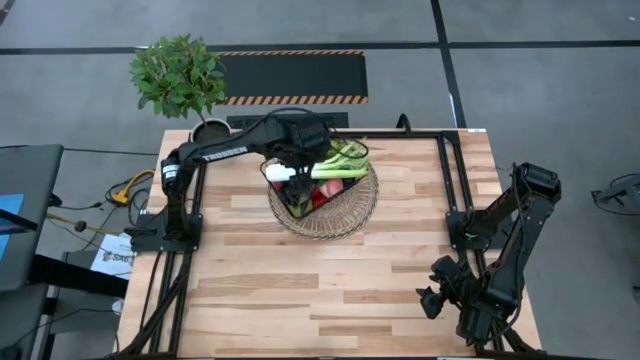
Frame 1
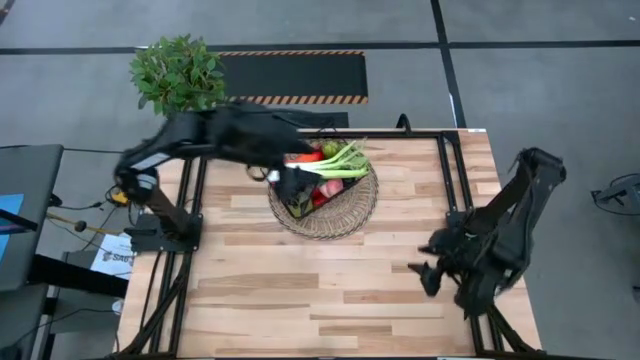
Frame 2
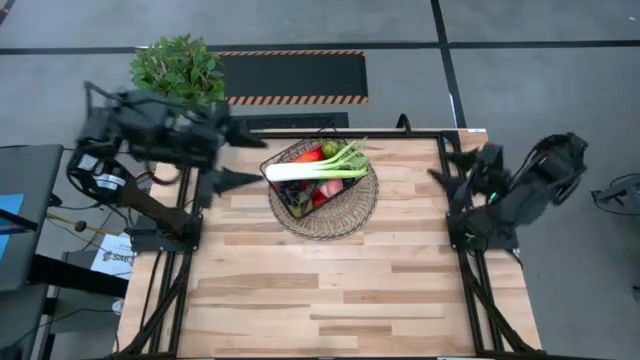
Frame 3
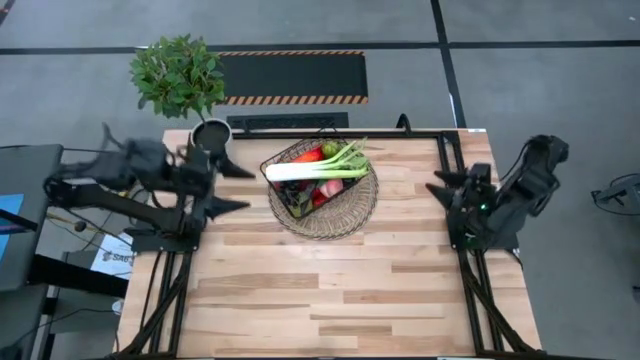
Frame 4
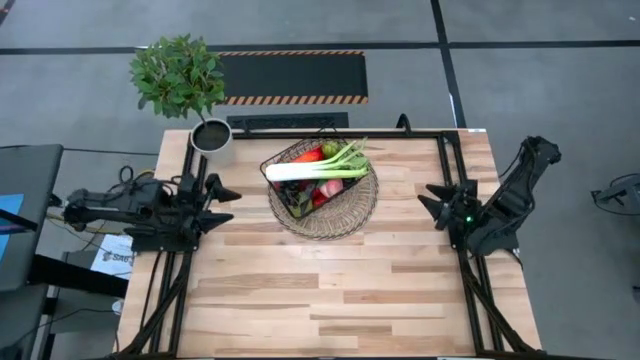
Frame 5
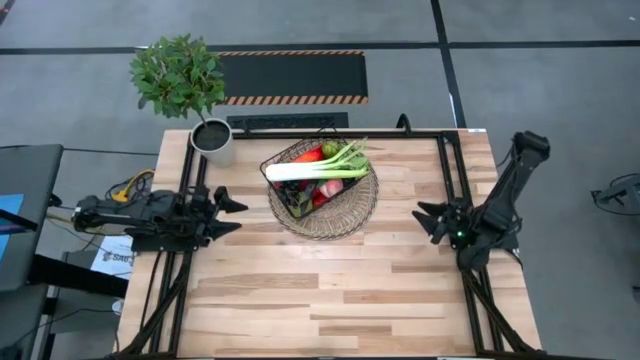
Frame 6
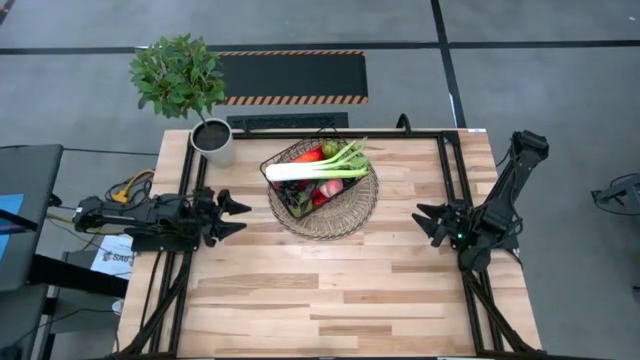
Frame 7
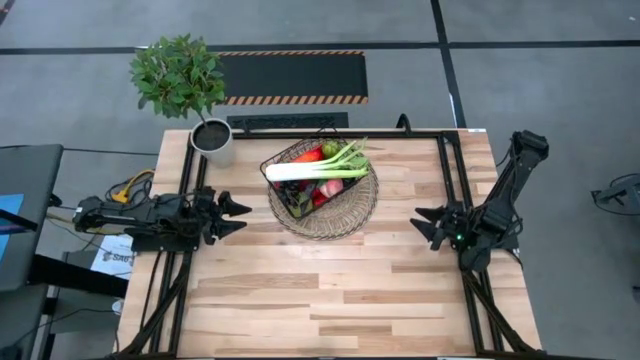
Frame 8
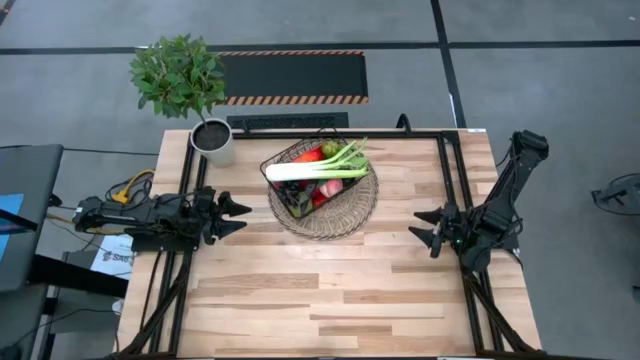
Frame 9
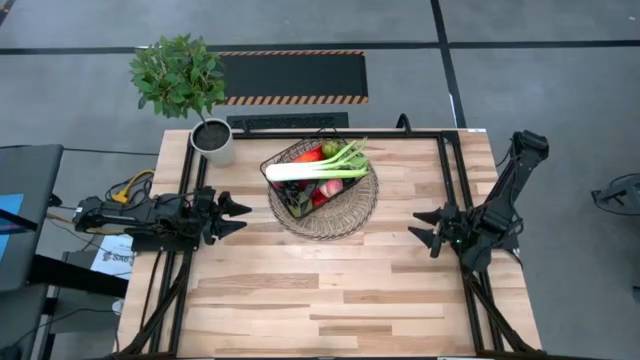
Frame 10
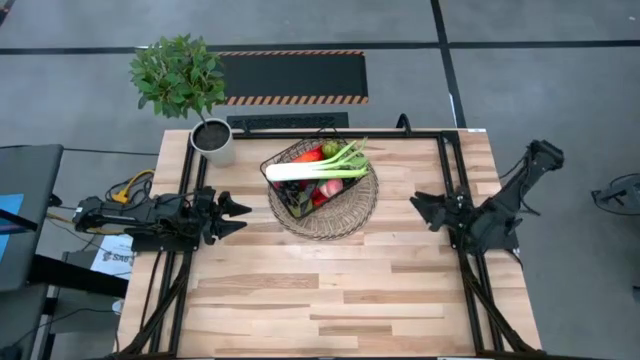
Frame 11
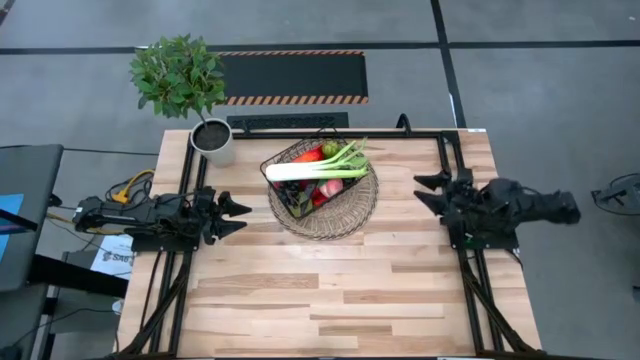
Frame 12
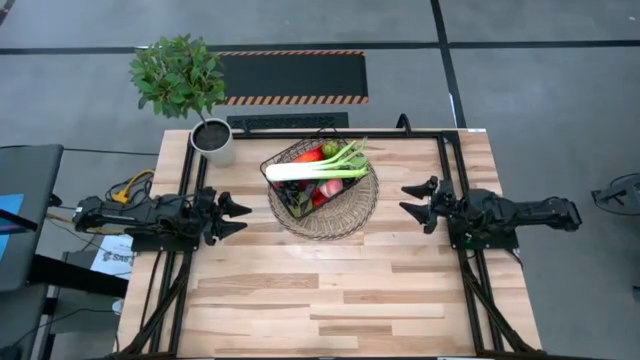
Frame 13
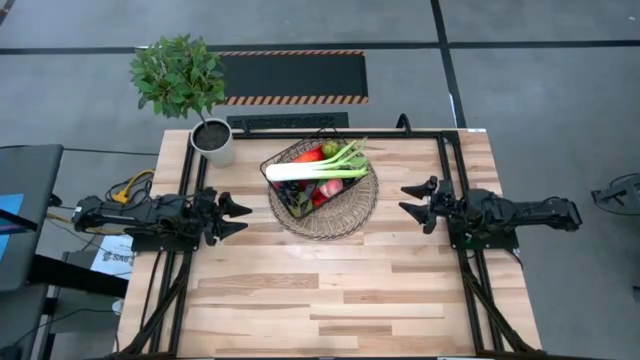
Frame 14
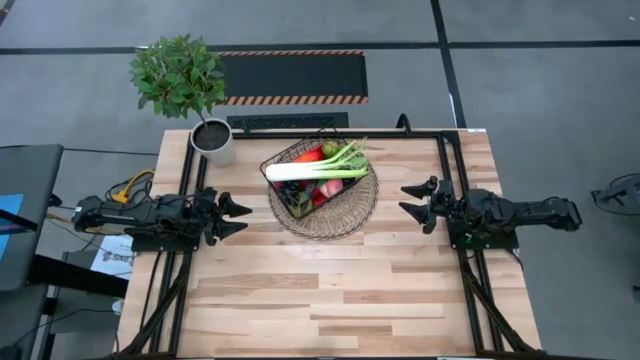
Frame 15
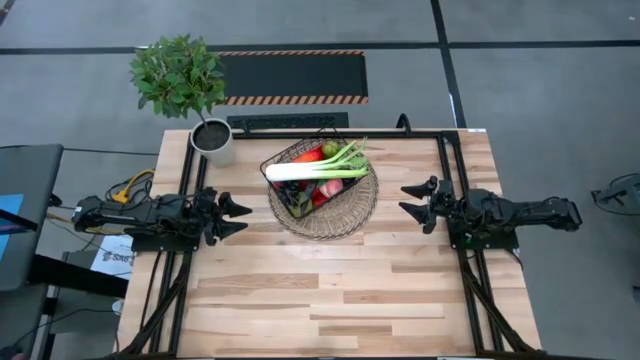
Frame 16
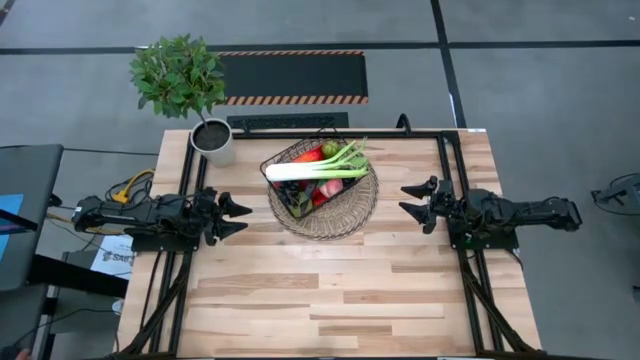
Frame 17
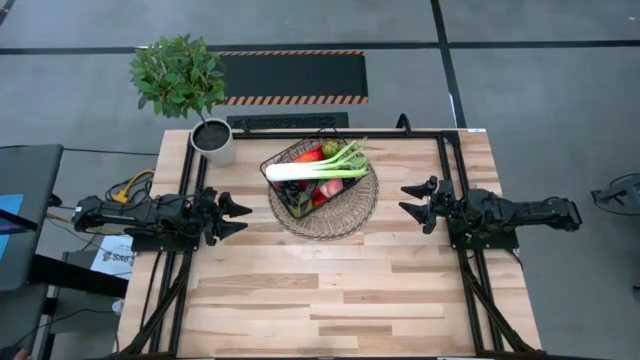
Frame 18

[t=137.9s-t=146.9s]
Task: Build produce basket
Return to Home Position

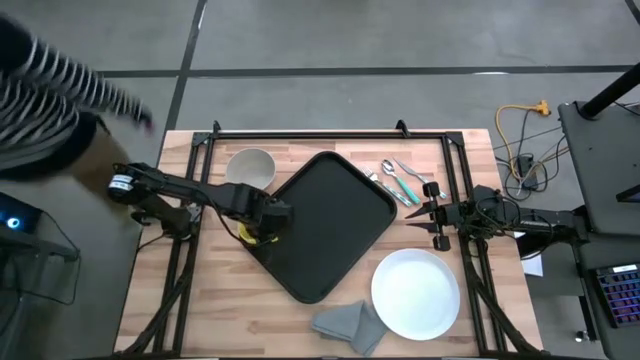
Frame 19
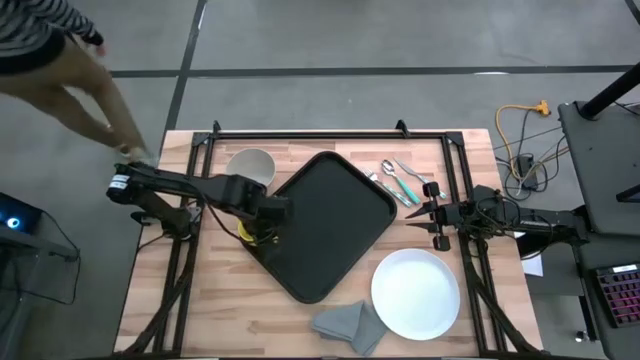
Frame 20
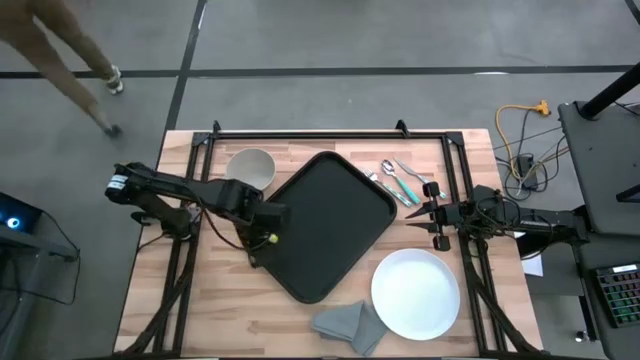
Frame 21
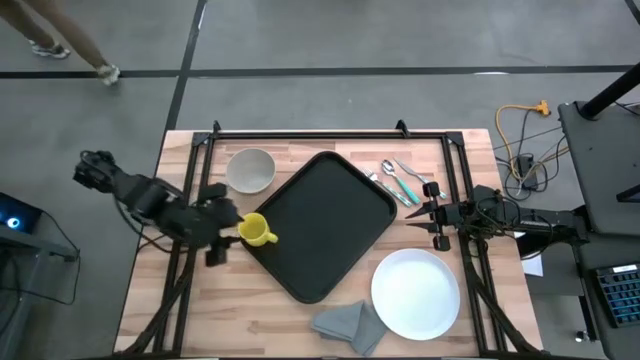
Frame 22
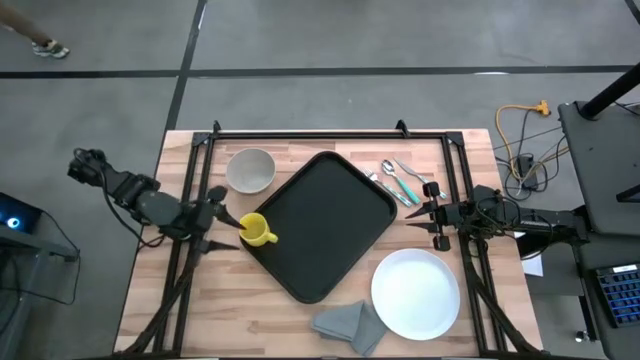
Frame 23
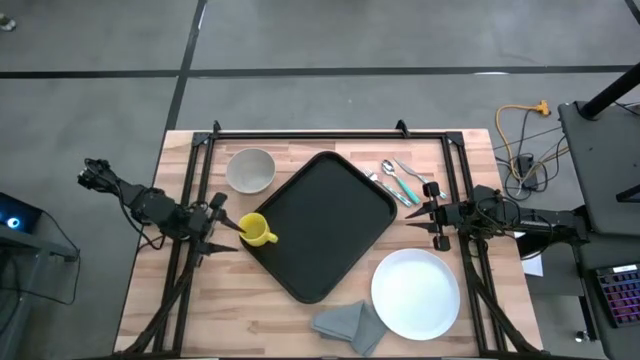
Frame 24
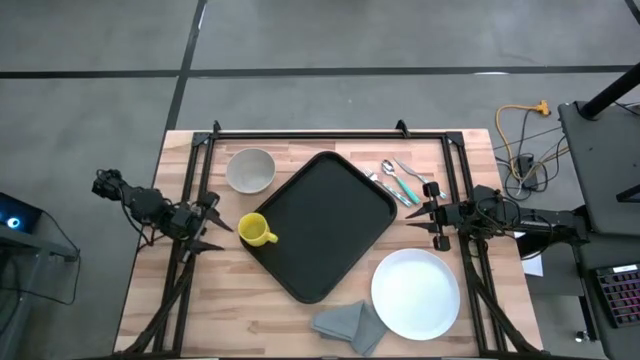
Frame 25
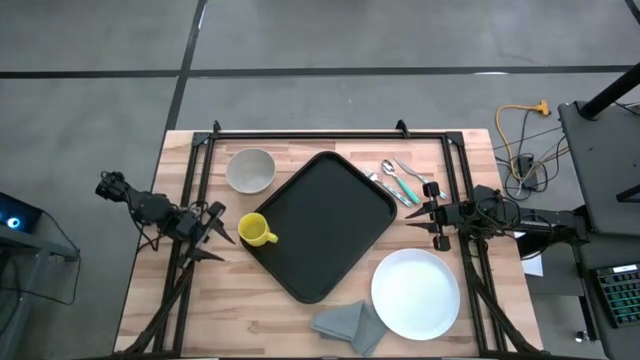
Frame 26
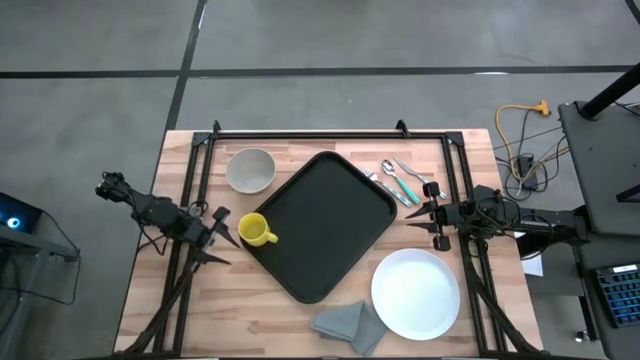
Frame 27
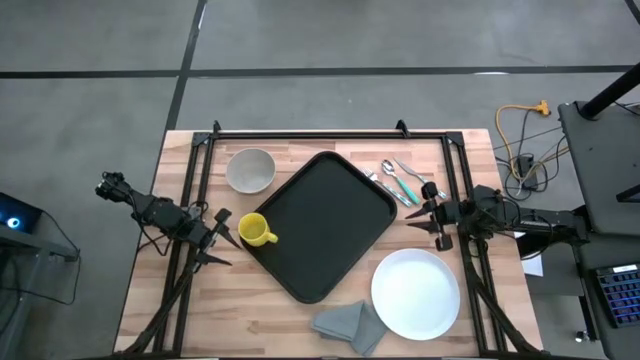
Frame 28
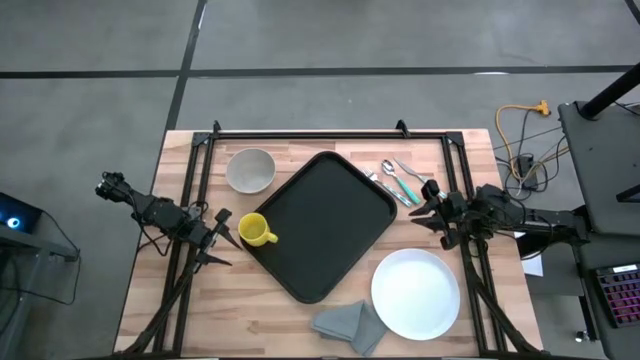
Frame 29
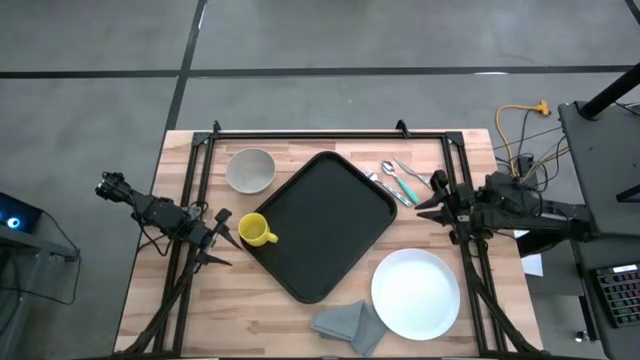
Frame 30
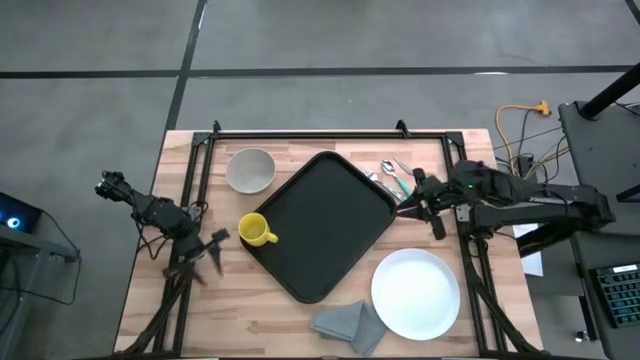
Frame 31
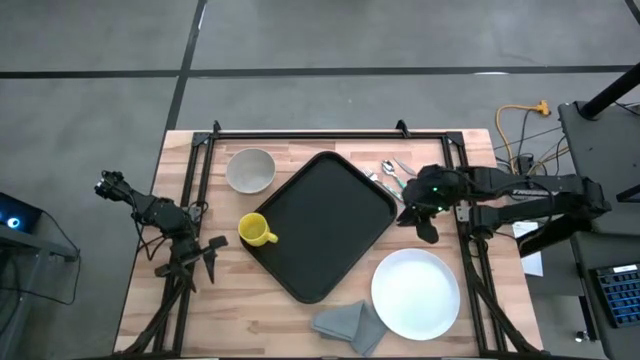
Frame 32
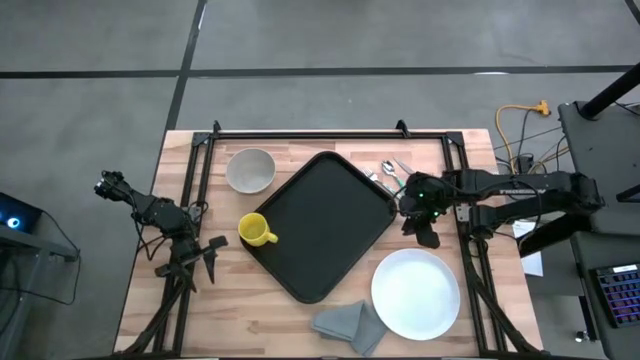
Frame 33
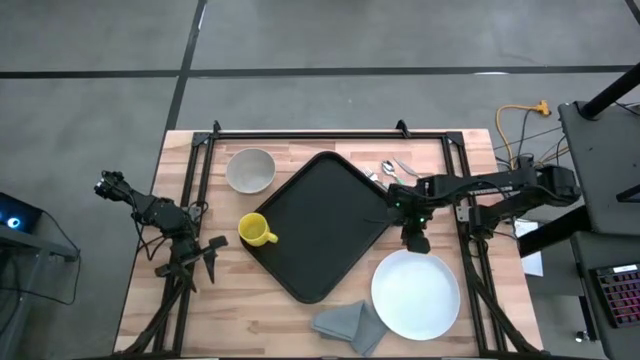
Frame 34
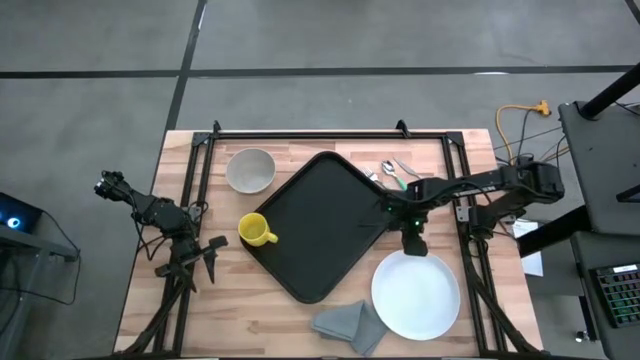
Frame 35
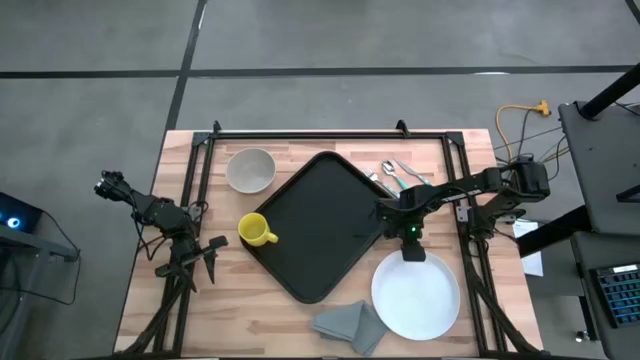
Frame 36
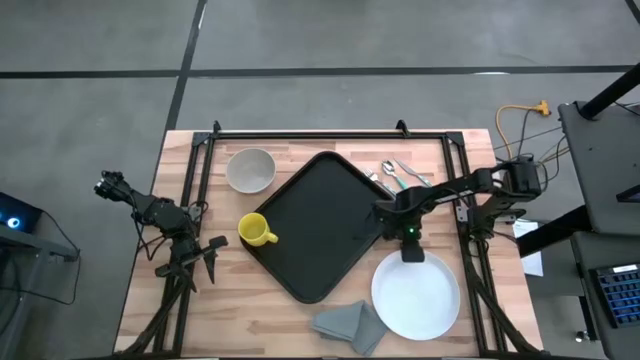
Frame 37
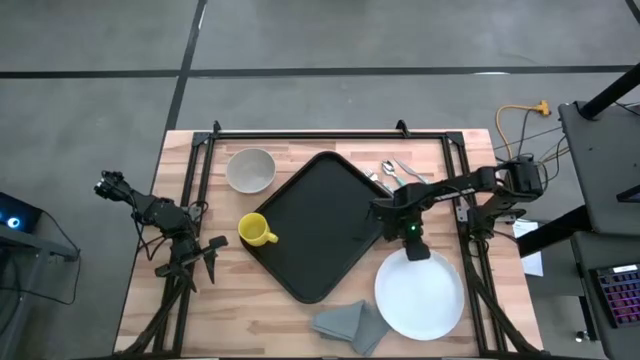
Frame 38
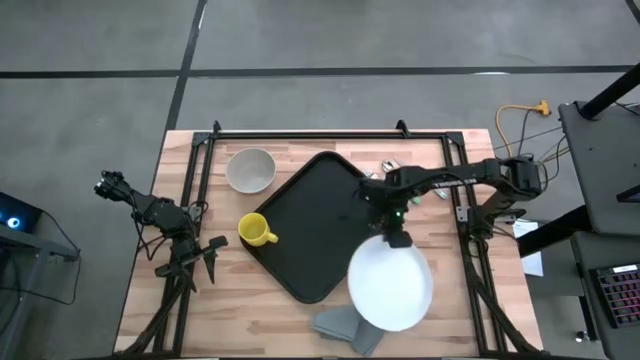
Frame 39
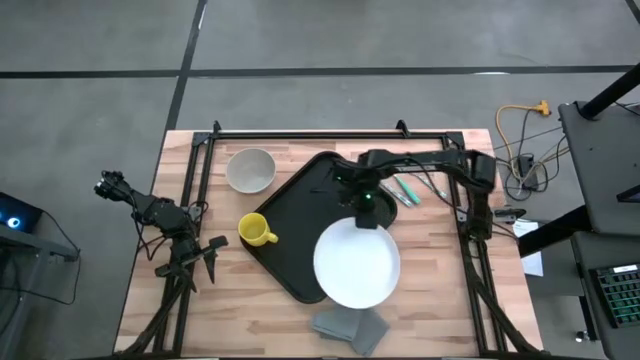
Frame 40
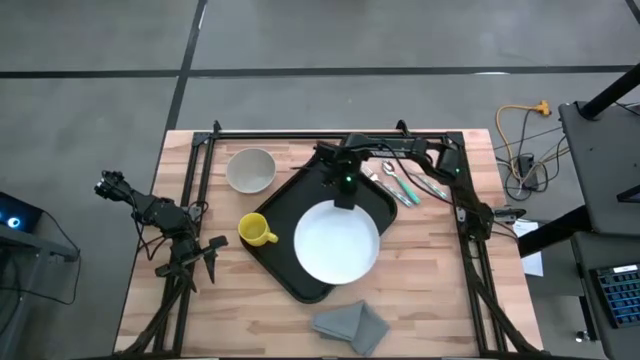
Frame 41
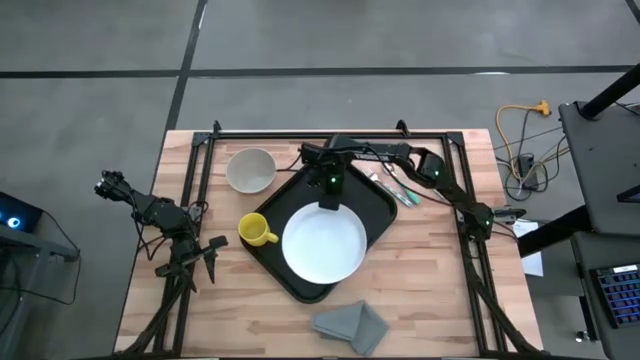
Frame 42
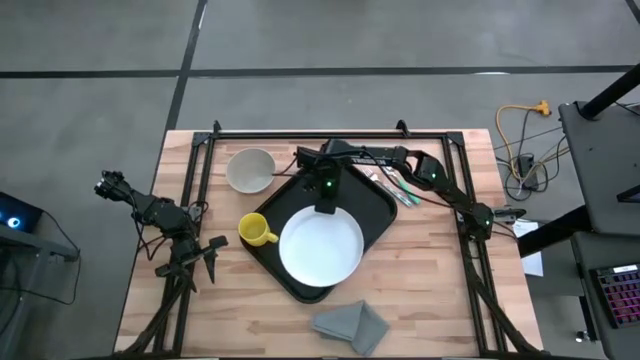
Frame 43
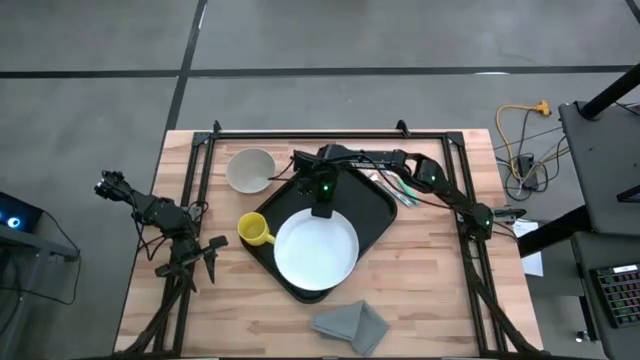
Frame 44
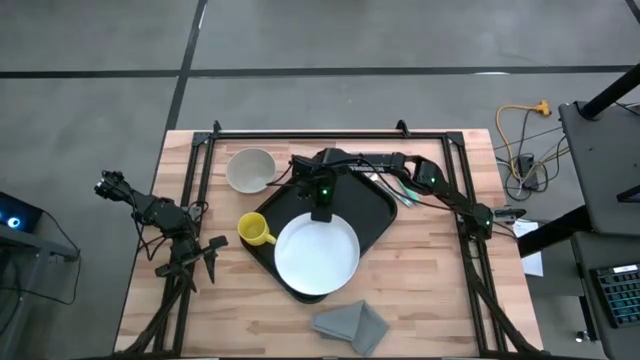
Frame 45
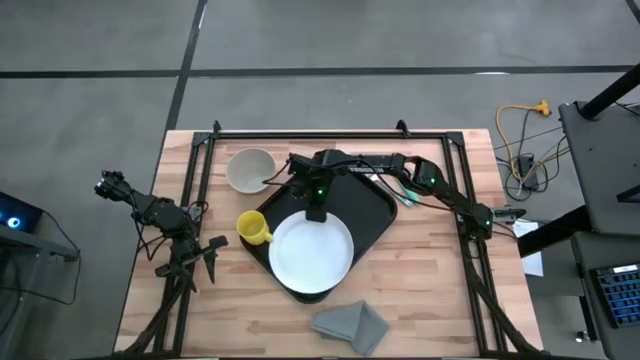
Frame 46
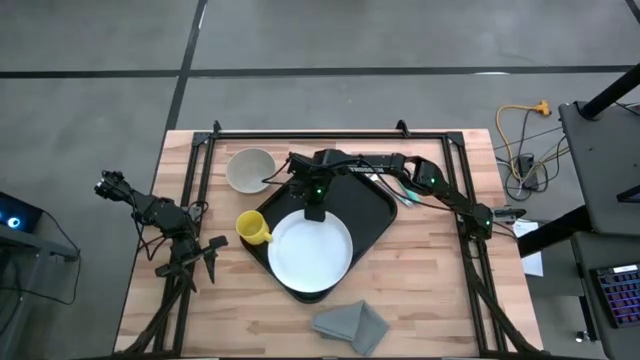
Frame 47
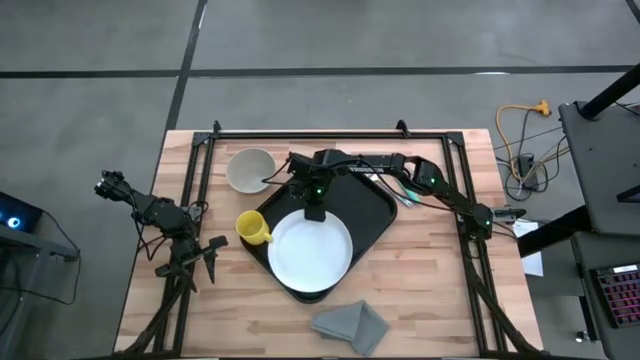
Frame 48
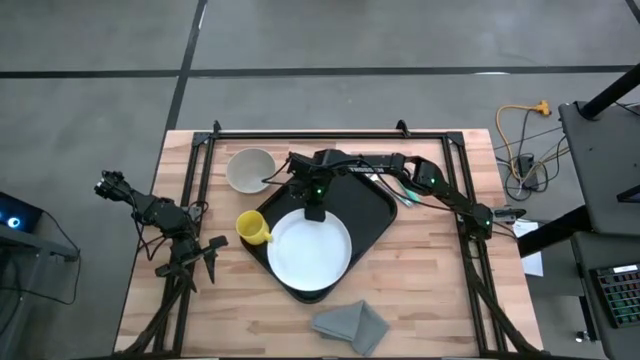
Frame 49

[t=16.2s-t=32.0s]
Task: Set up tray
Put the white plate below the yellow cup on the black serving tray
